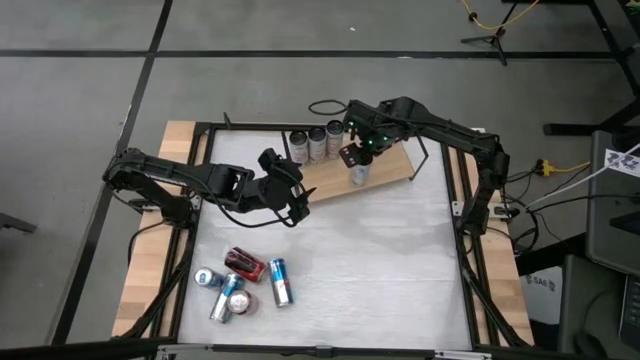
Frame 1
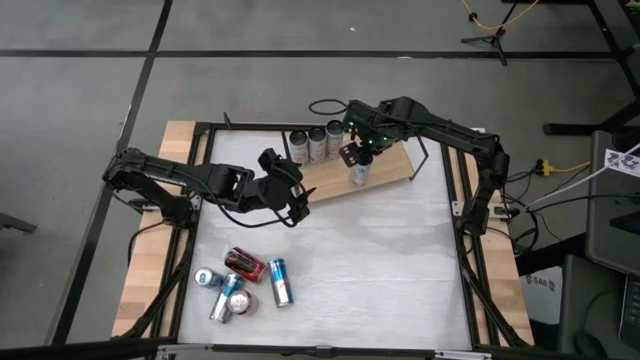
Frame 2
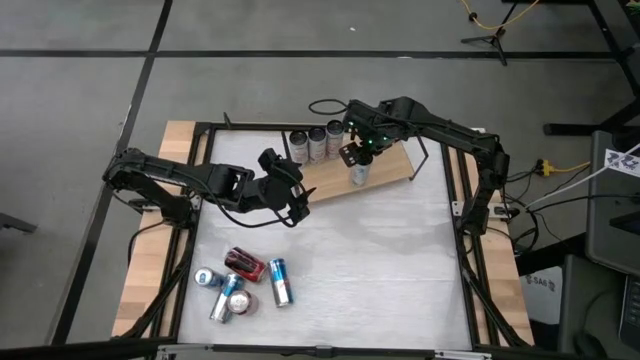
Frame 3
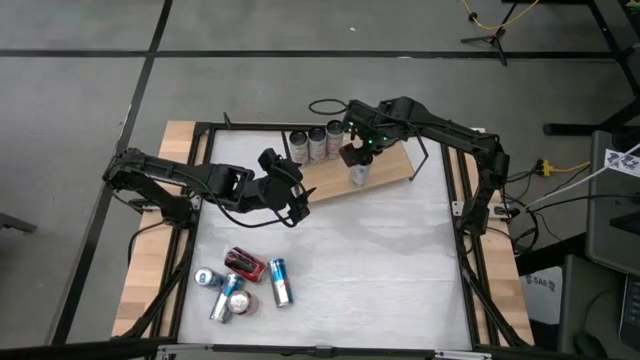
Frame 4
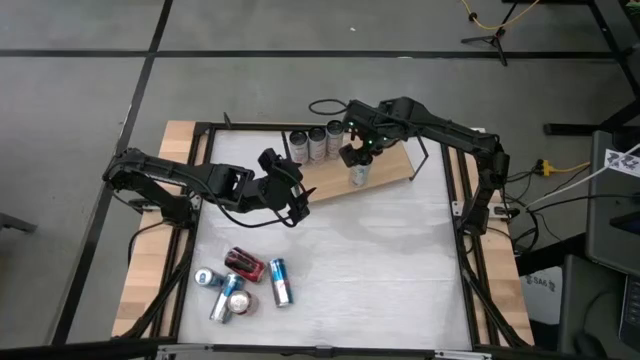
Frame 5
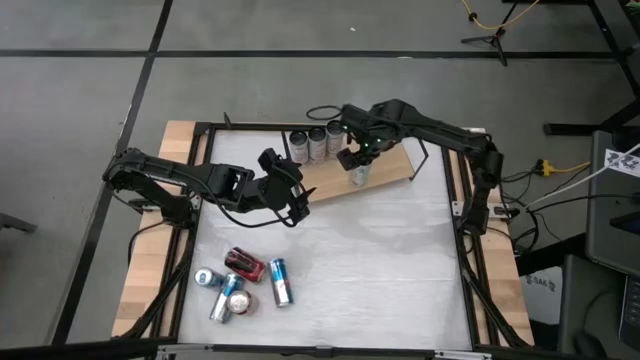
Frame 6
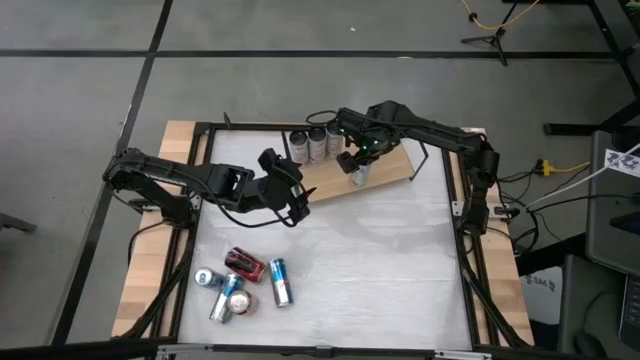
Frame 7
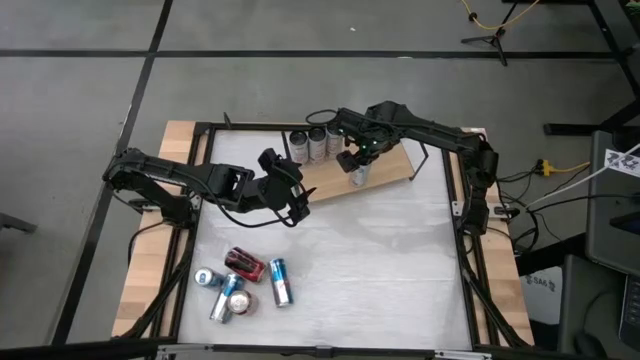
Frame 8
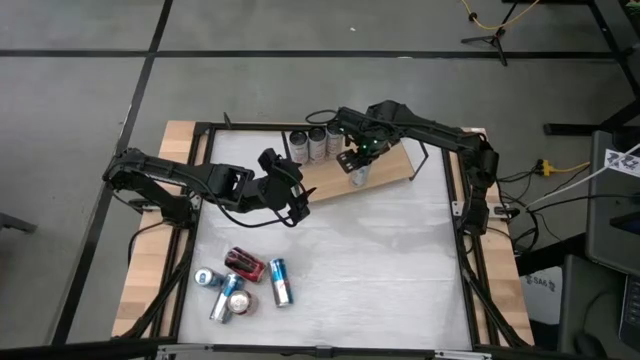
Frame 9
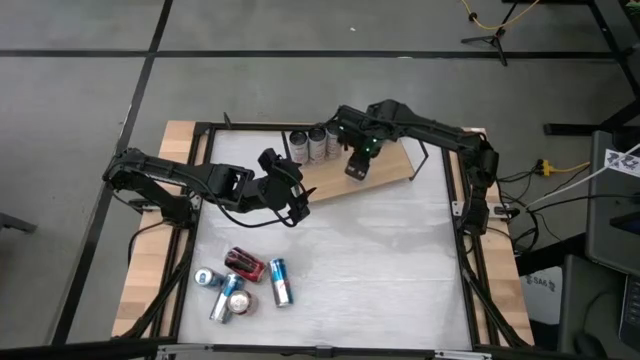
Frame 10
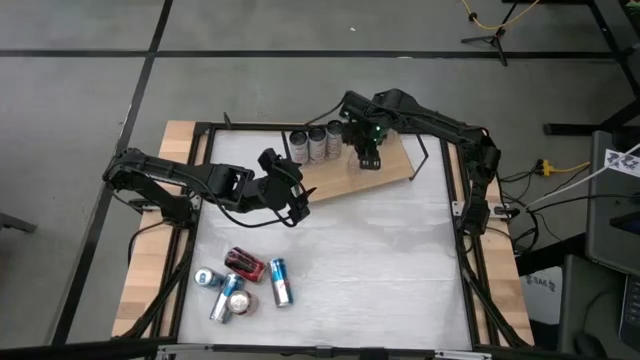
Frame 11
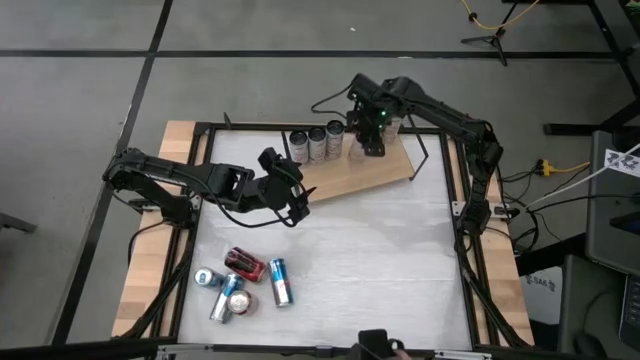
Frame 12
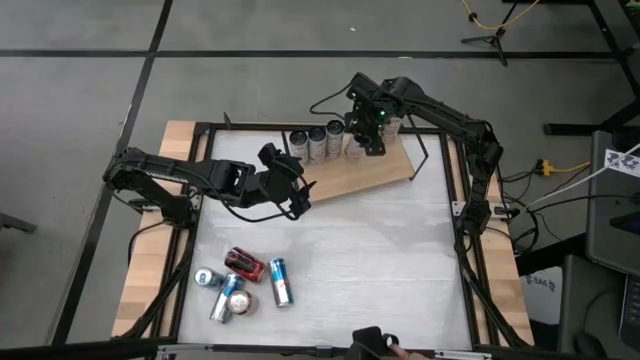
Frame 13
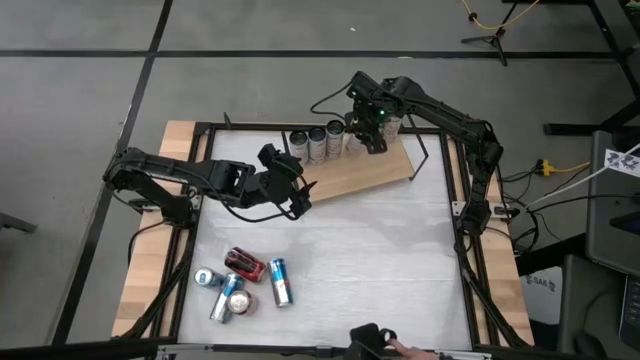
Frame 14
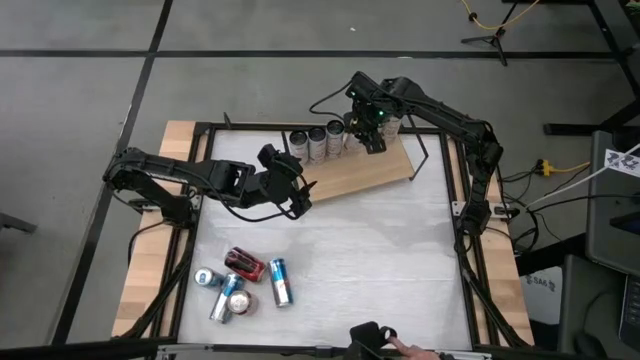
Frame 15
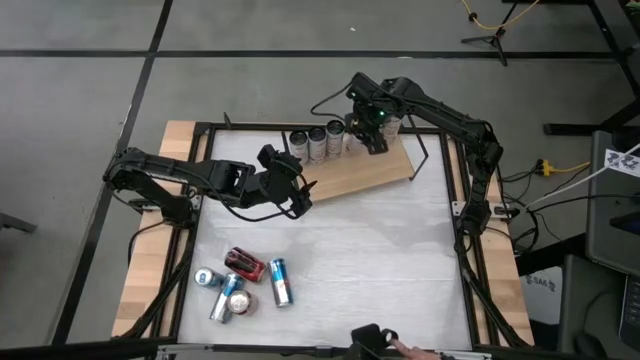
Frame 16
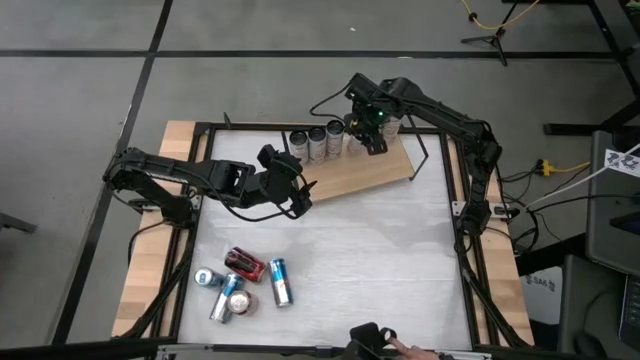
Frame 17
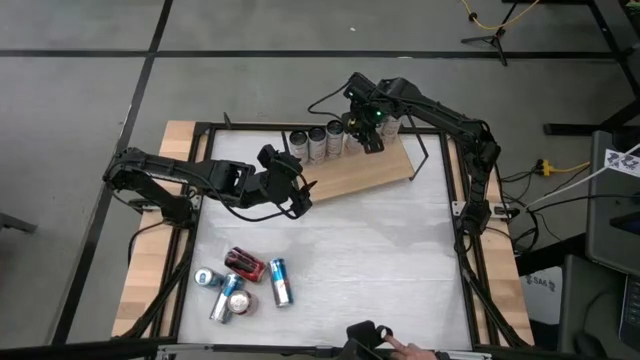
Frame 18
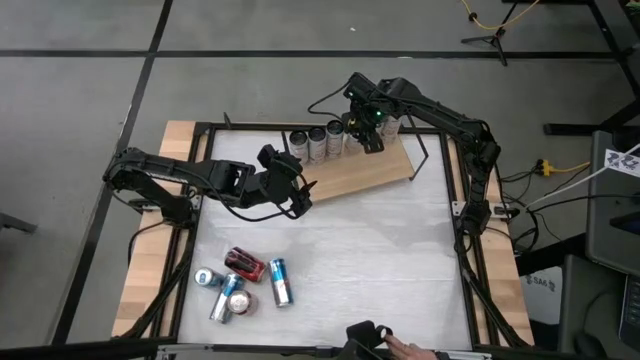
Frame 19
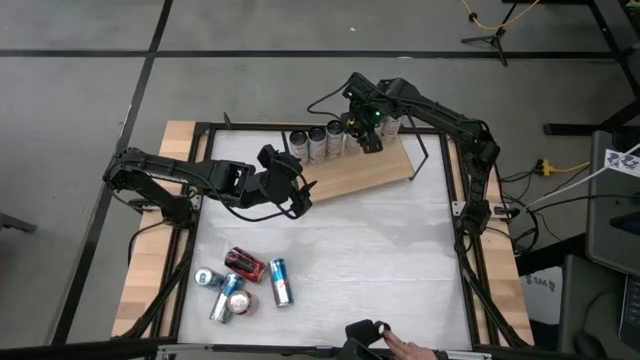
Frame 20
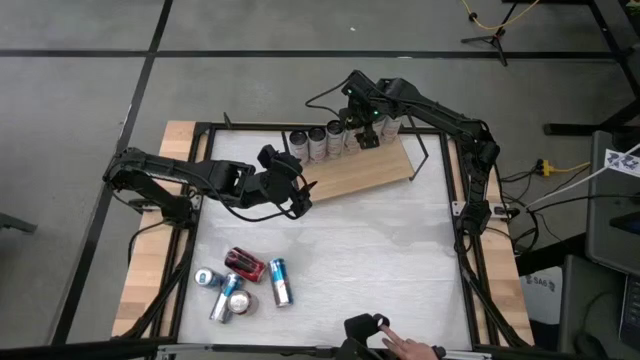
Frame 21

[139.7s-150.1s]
Task: Place canned beverage on shelf
Put the white pink soda can on the shelf aligned with the other white pink soda cans

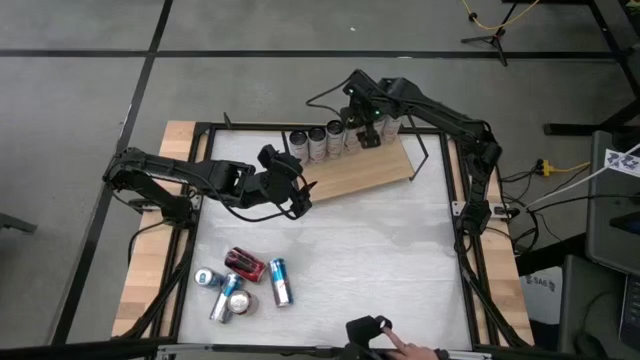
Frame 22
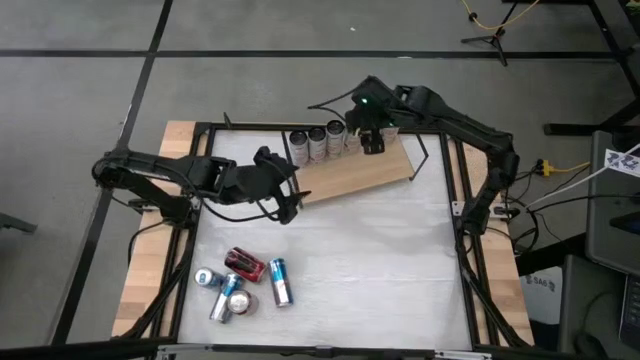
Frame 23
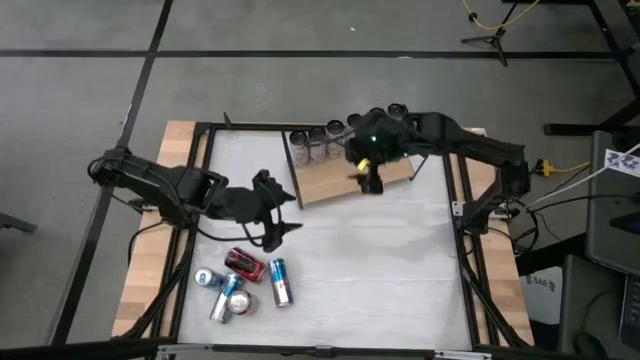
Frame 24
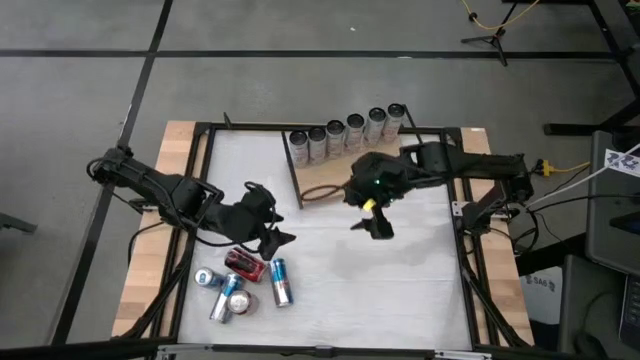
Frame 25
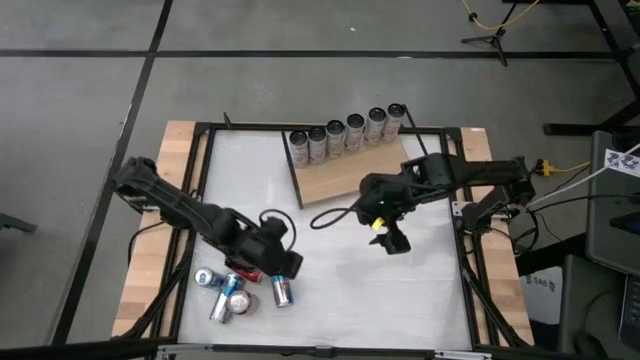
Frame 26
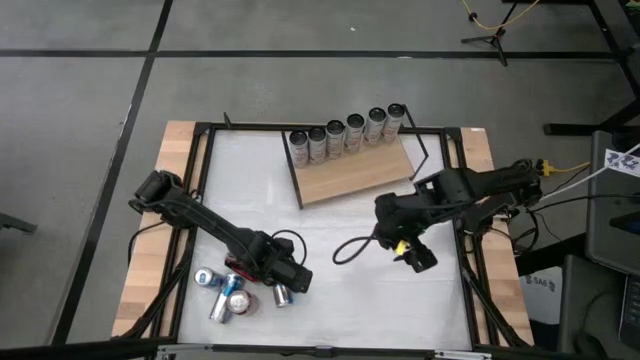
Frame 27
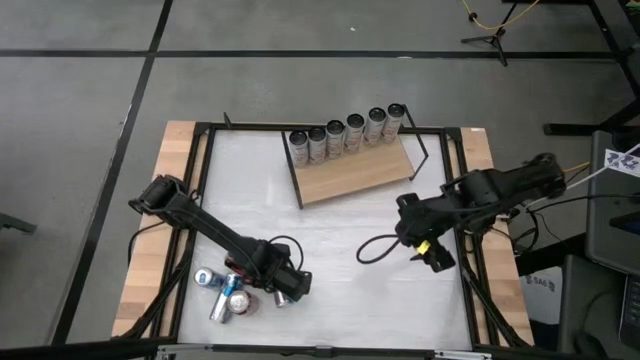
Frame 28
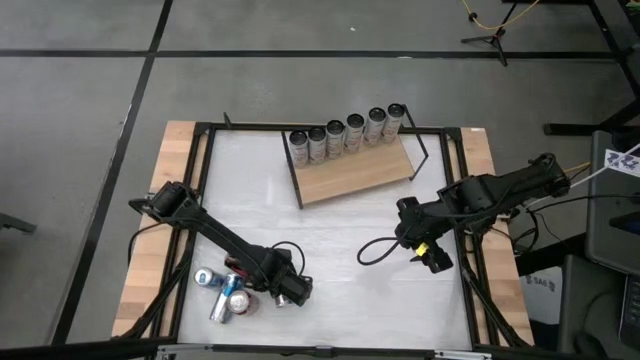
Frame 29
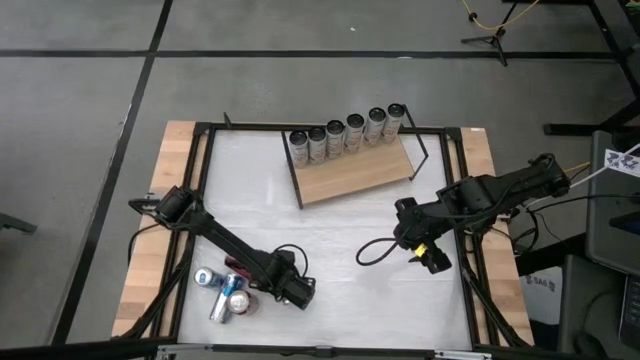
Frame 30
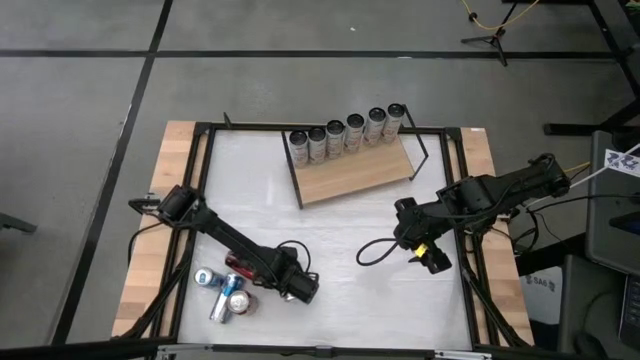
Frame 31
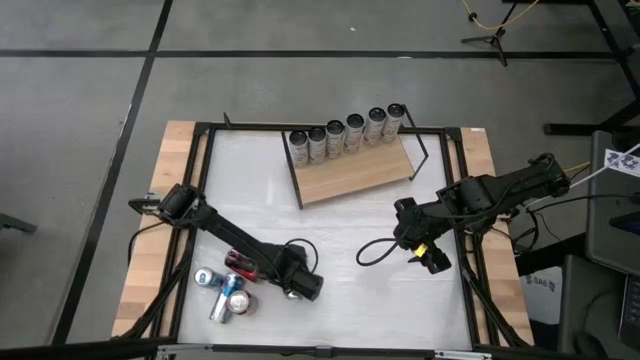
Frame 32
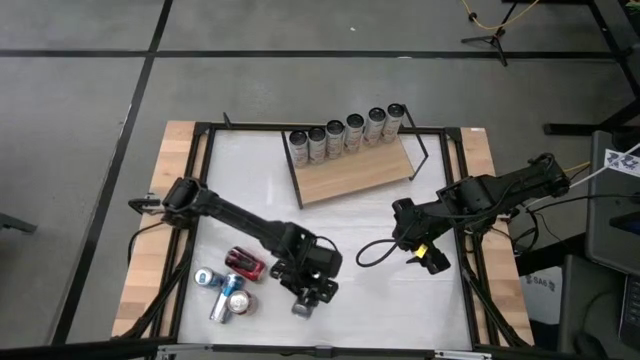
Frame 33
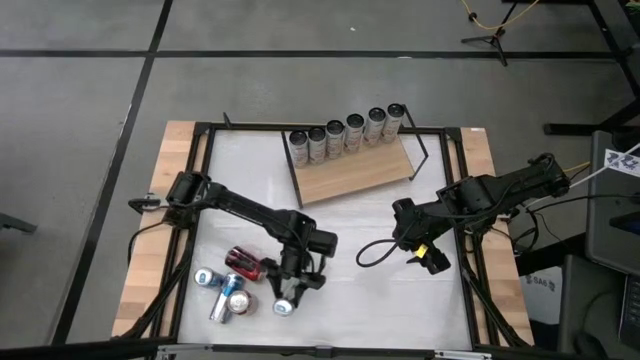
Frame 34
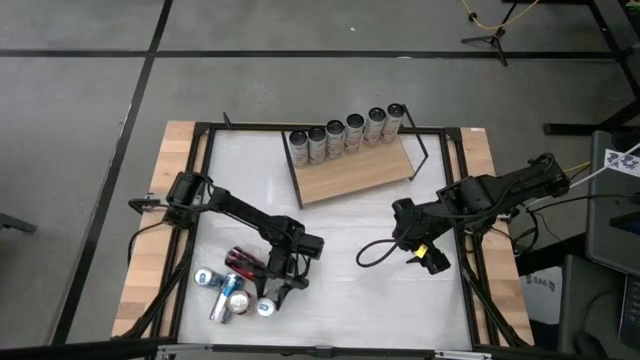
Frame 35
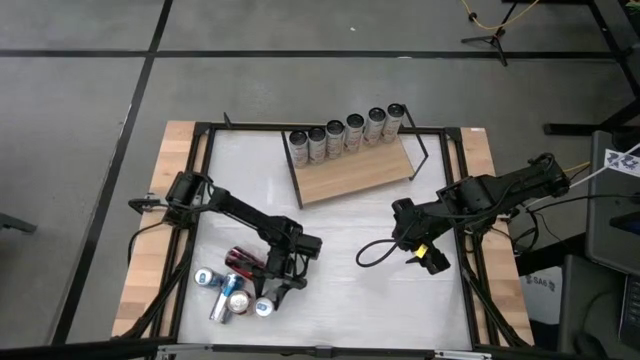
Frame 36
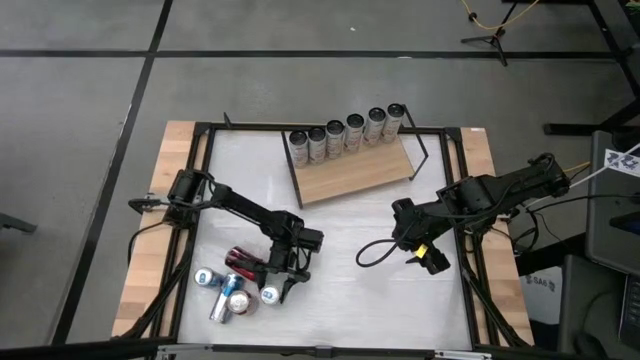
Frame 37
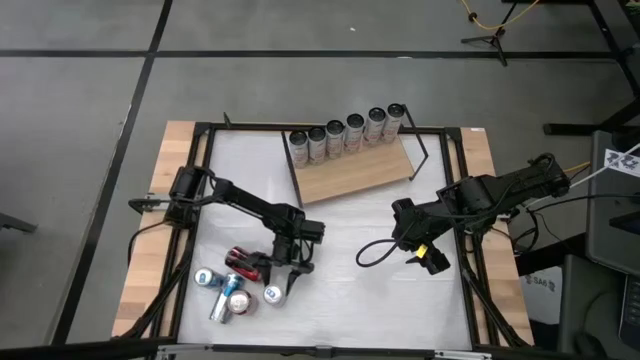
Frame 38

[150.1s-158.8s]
Adjust the blue soda can

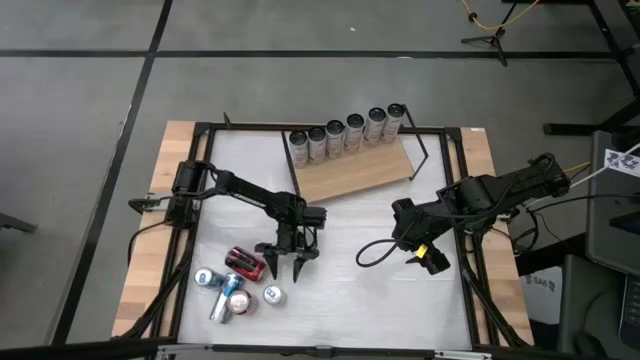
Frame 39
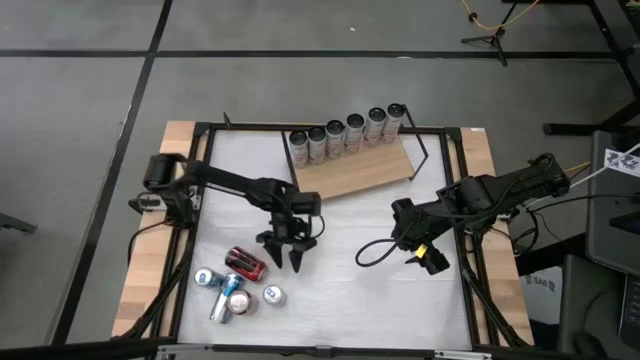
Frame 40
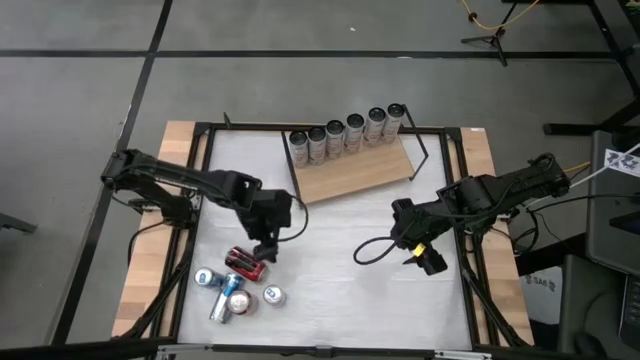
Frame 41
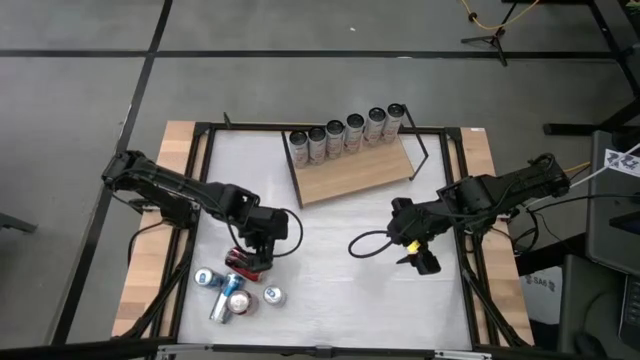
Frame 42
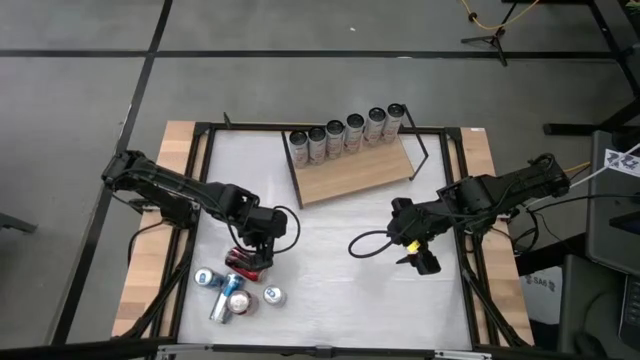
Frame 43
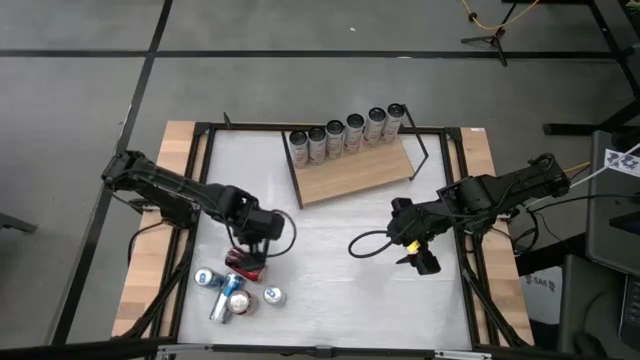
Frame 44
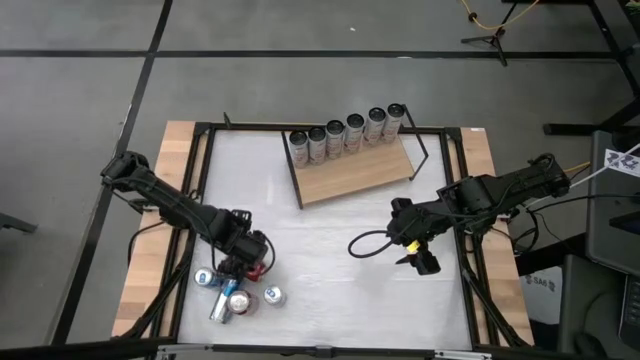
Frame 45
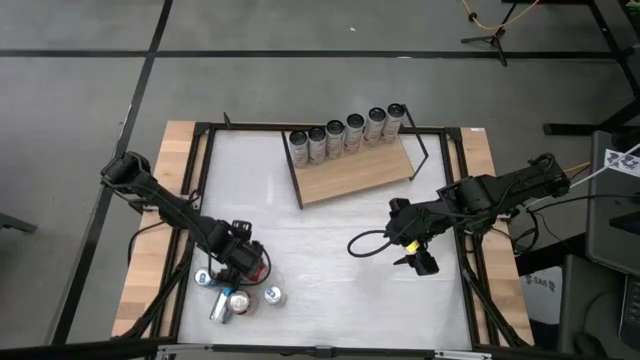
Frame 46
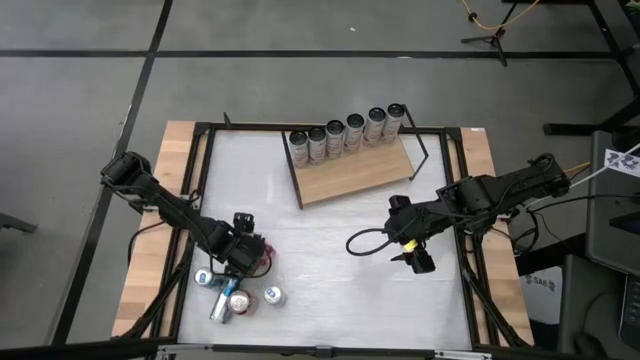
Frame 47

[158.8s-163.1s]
Put the red black soda can on the shelf
